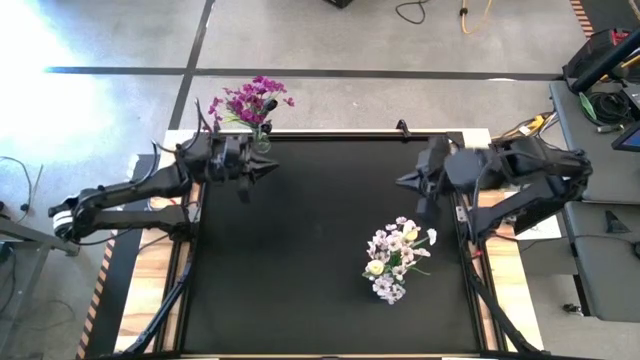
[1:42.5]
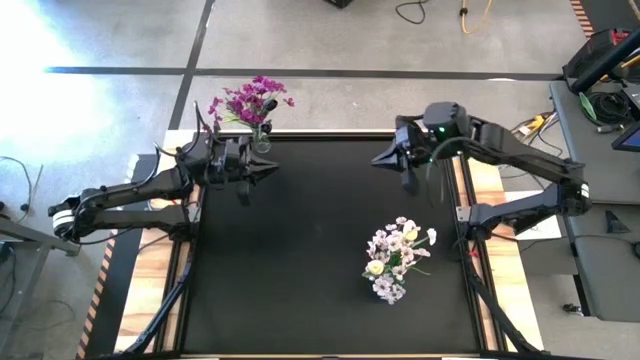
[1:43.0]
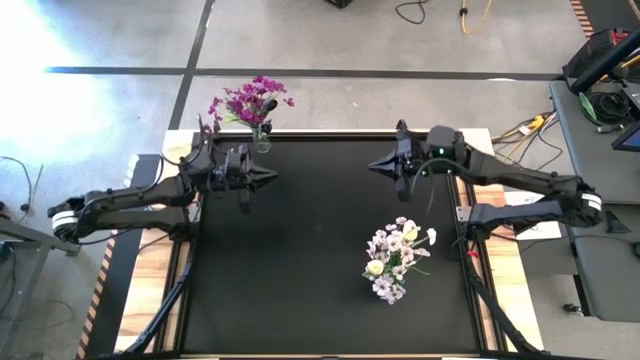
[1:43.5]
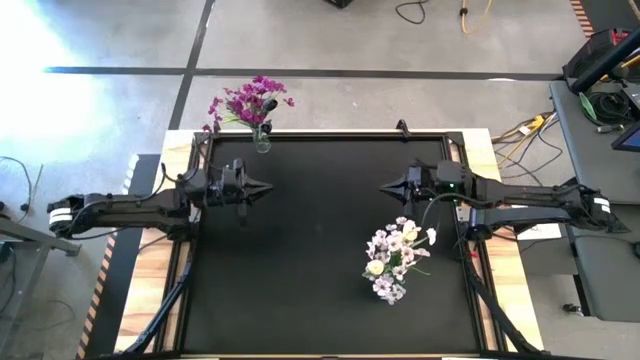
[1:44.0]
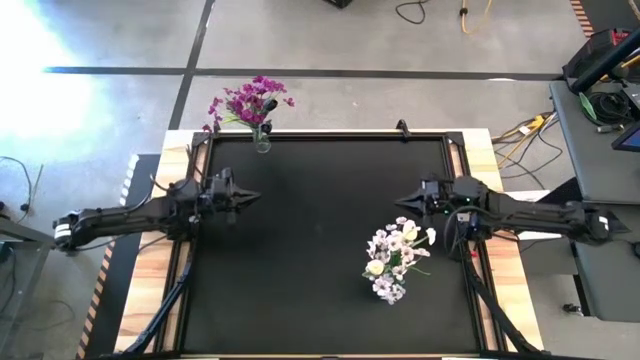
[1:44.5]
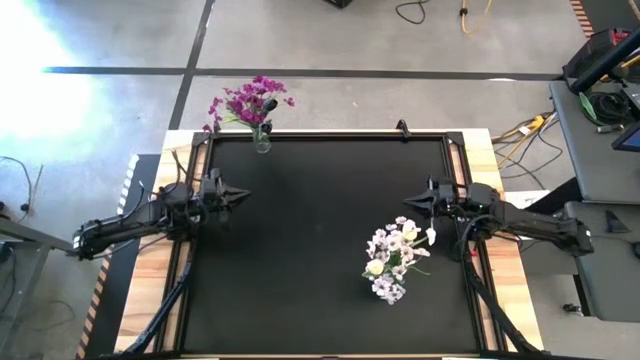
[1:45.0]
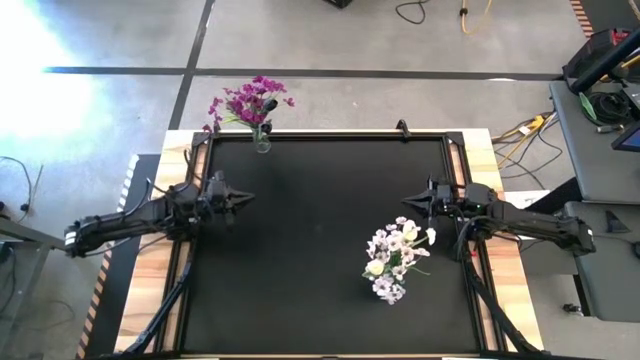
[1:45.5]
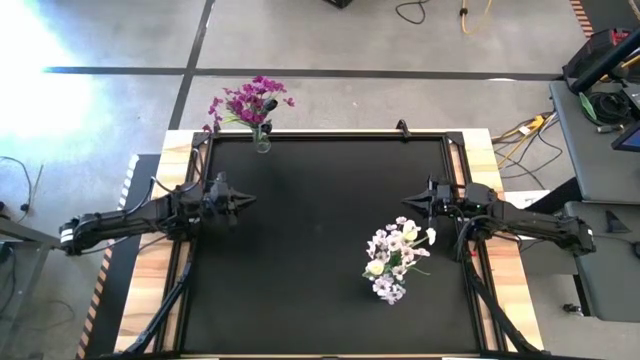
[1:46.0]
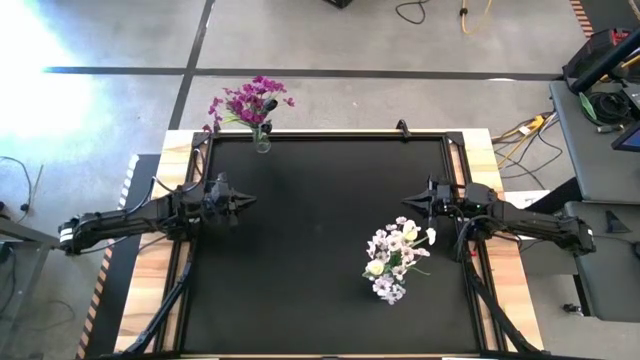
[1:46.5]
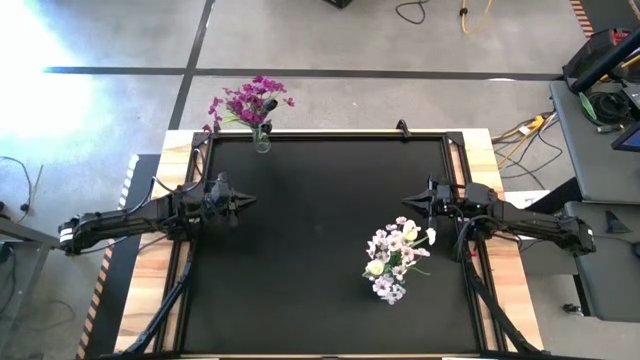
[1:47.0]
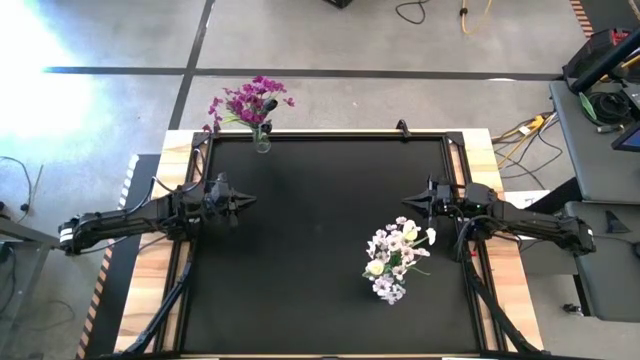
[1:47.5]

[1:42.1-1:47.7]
Task: Sort flowers into vase by color
Return to Home Position

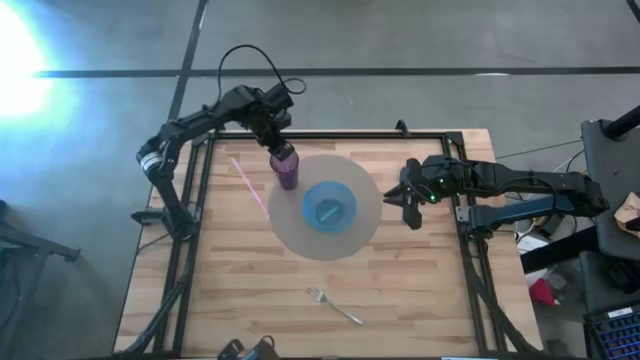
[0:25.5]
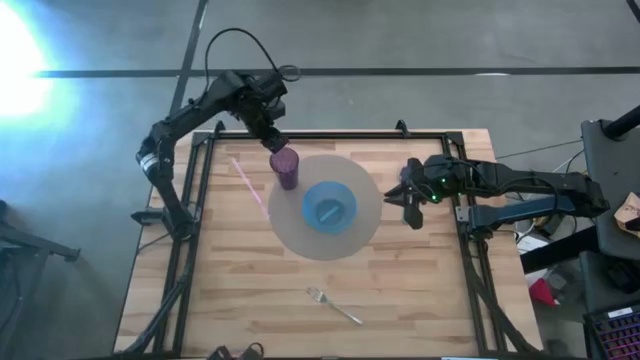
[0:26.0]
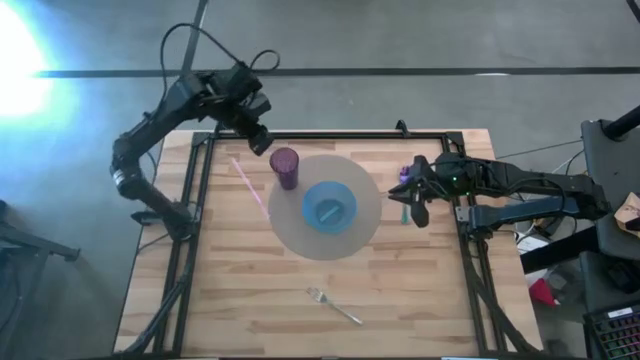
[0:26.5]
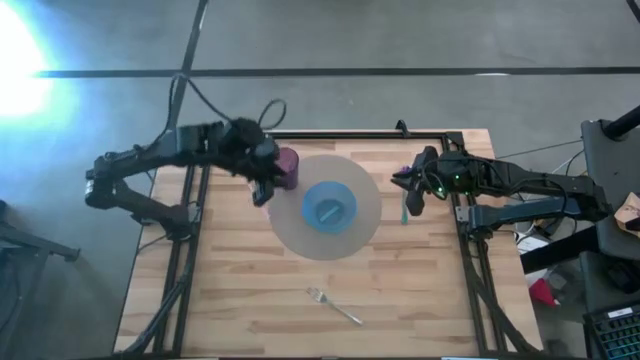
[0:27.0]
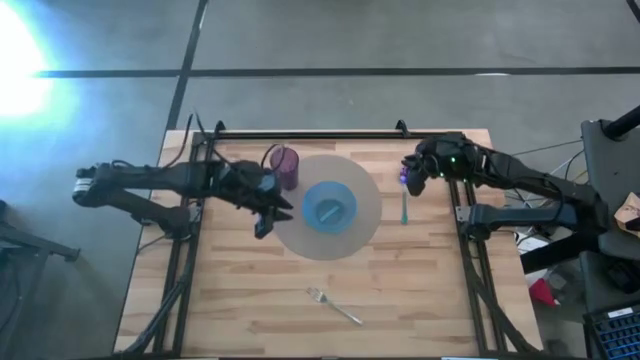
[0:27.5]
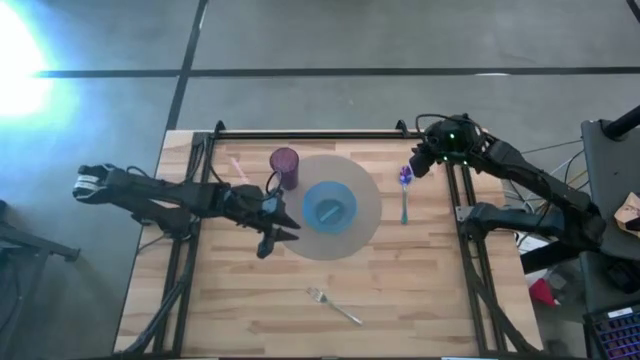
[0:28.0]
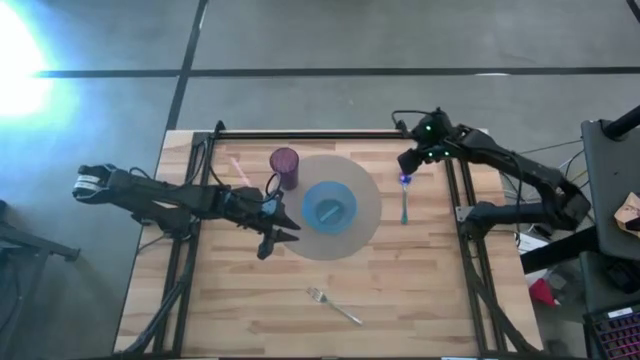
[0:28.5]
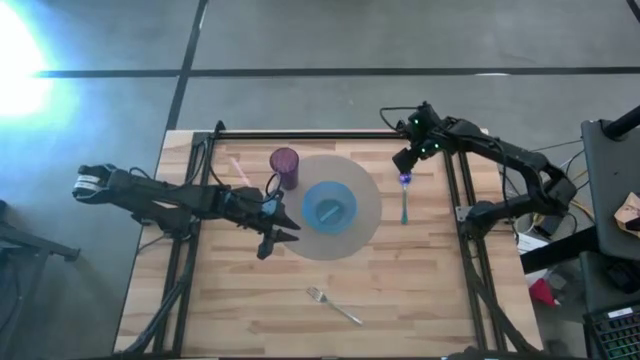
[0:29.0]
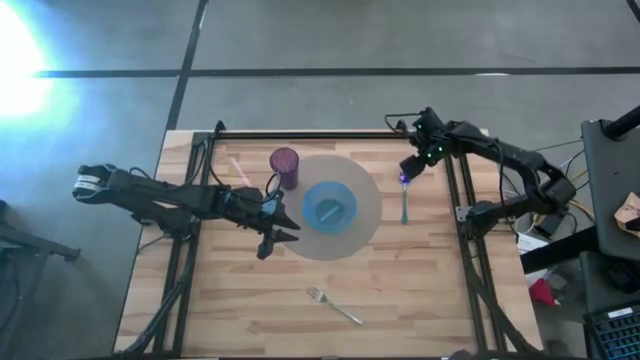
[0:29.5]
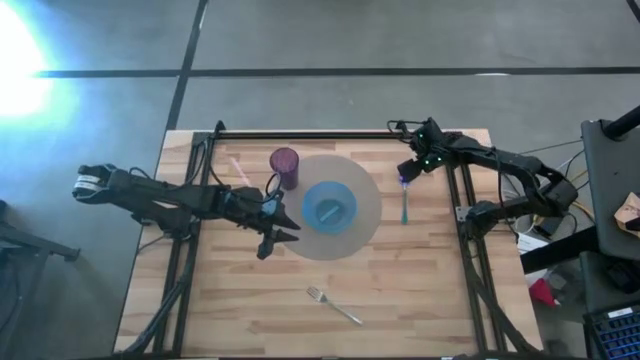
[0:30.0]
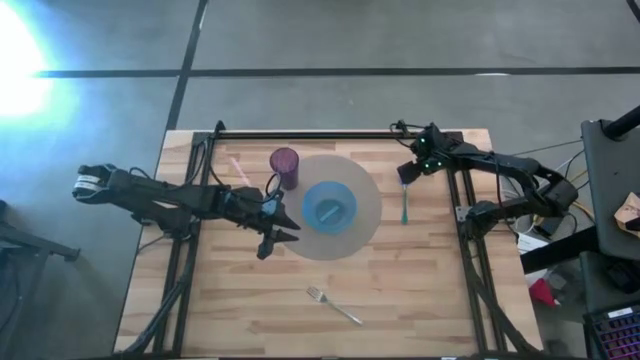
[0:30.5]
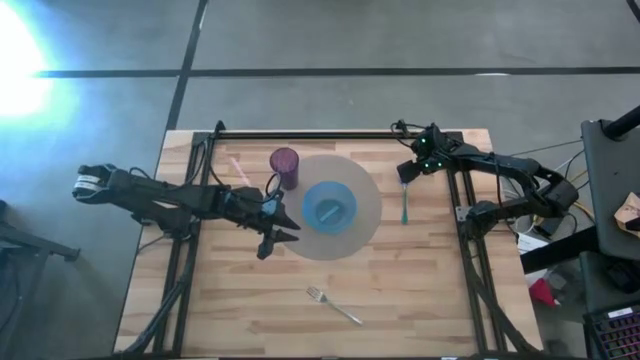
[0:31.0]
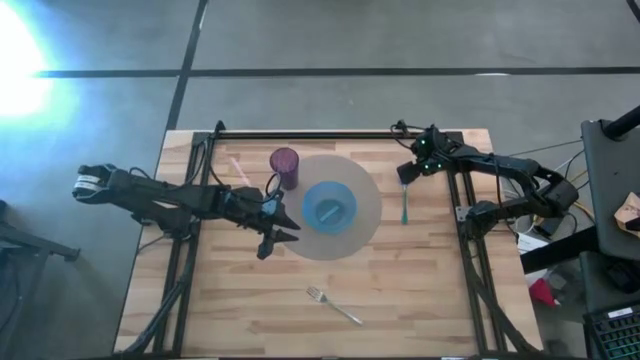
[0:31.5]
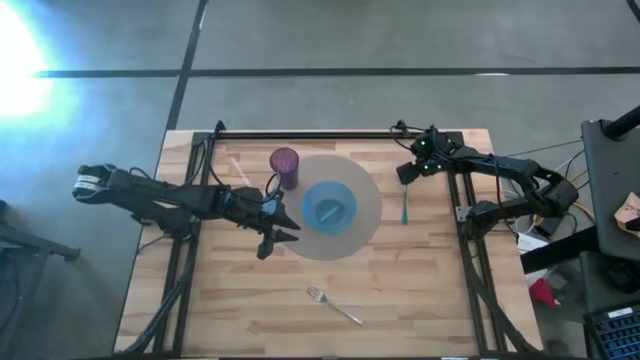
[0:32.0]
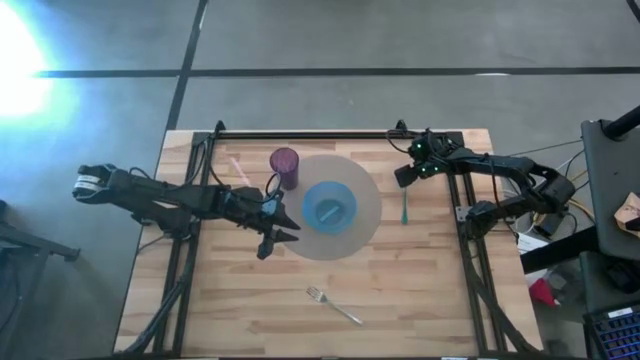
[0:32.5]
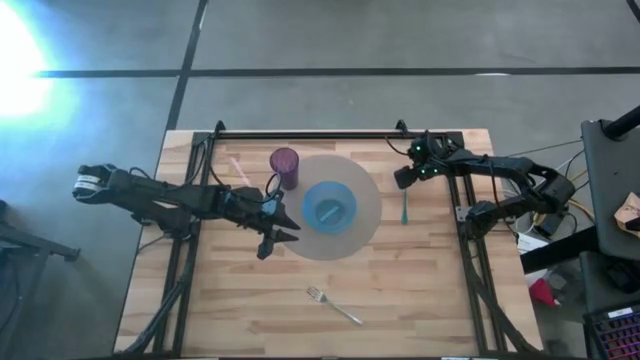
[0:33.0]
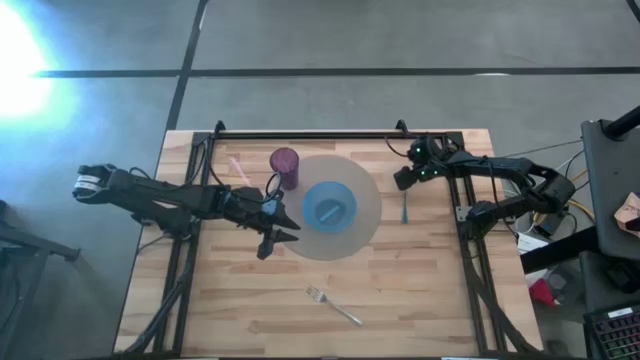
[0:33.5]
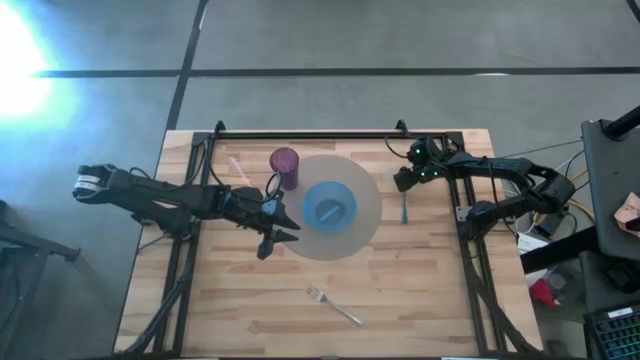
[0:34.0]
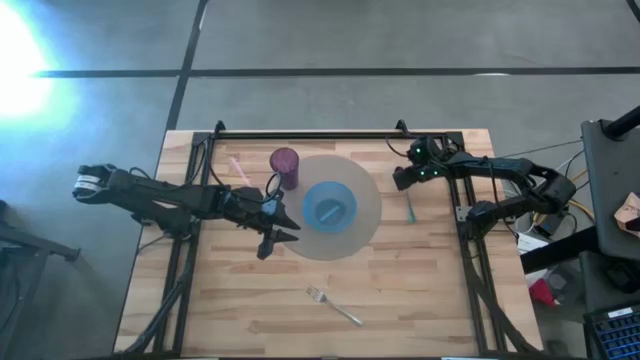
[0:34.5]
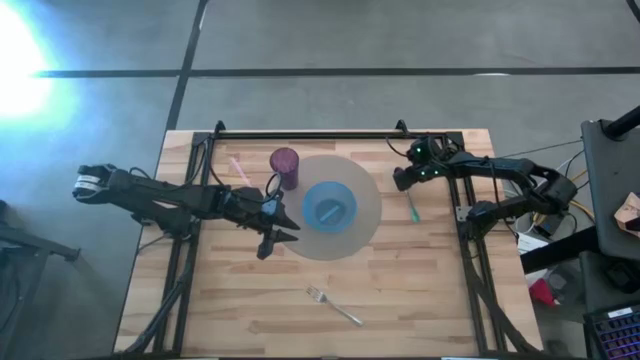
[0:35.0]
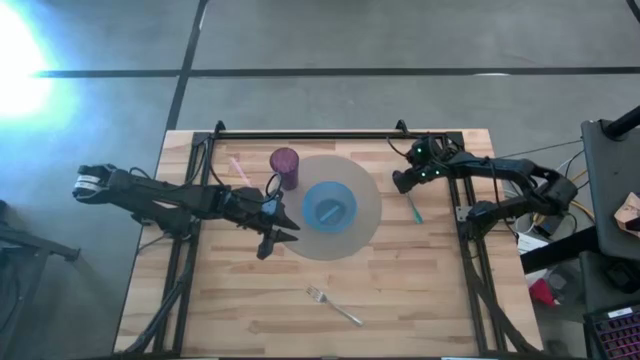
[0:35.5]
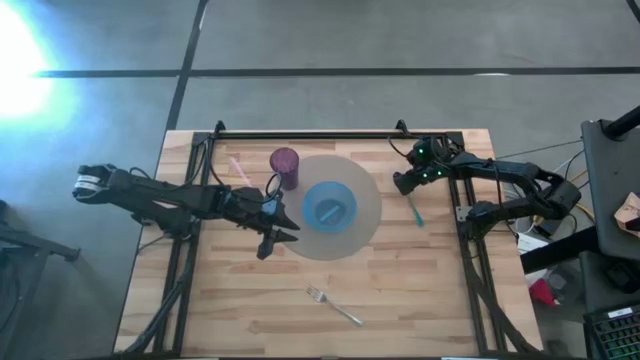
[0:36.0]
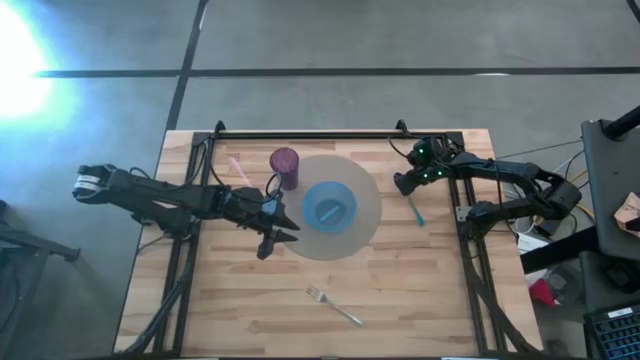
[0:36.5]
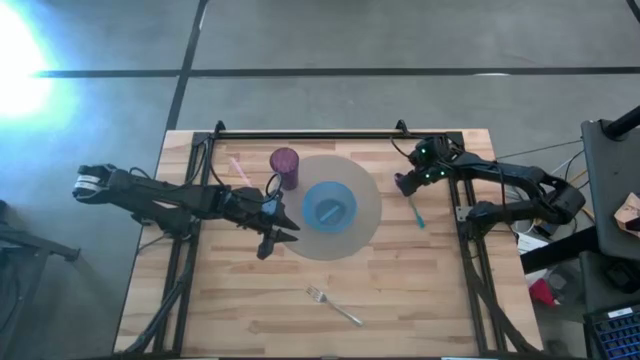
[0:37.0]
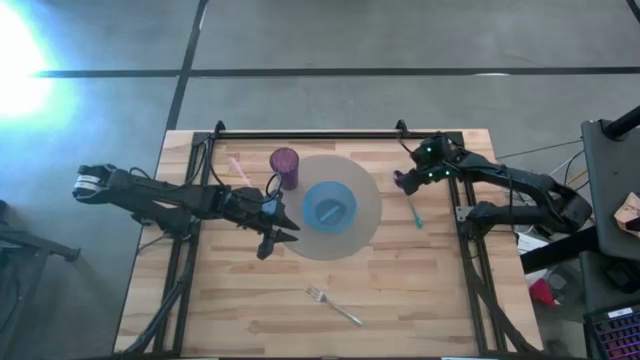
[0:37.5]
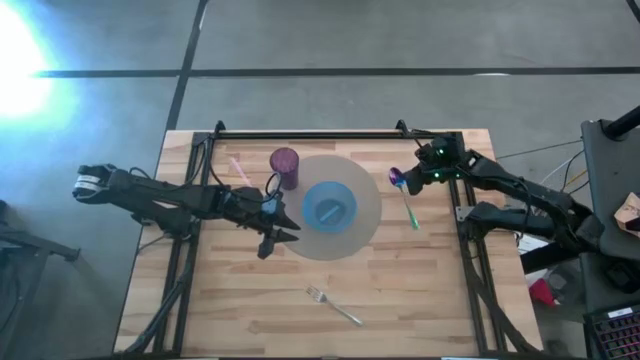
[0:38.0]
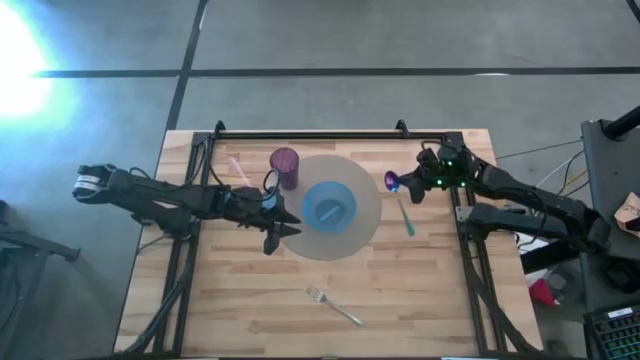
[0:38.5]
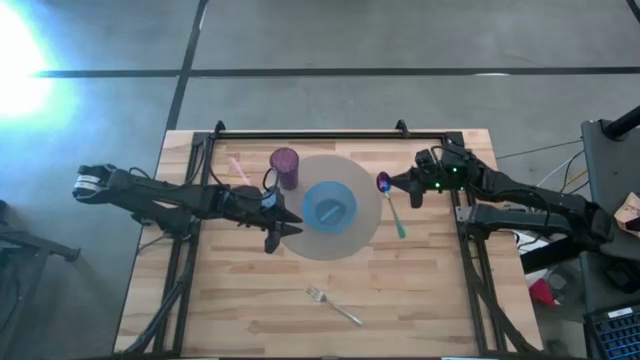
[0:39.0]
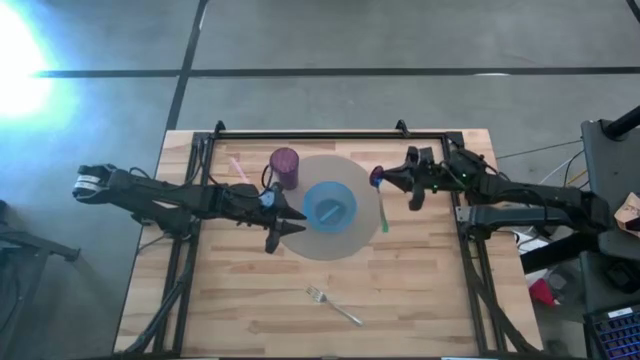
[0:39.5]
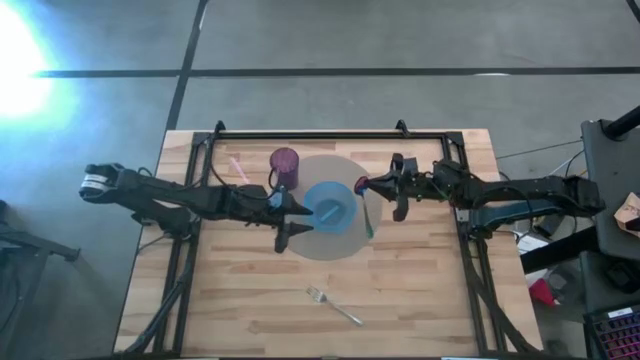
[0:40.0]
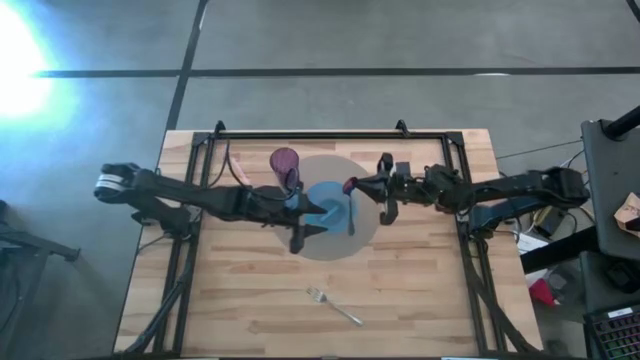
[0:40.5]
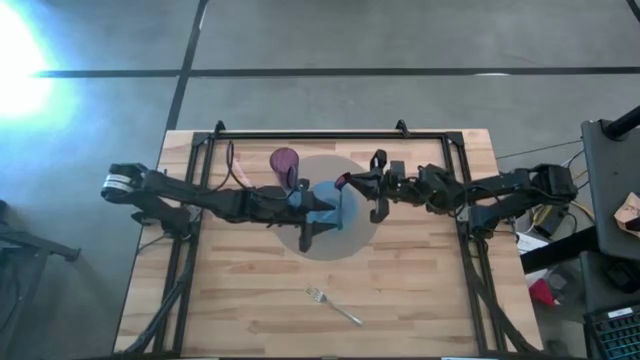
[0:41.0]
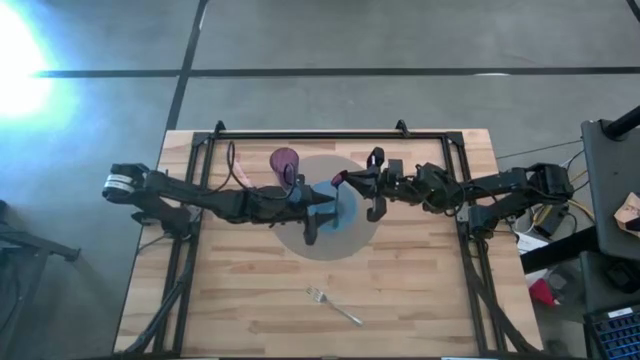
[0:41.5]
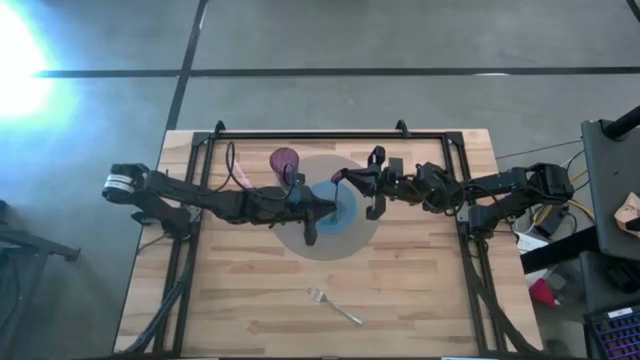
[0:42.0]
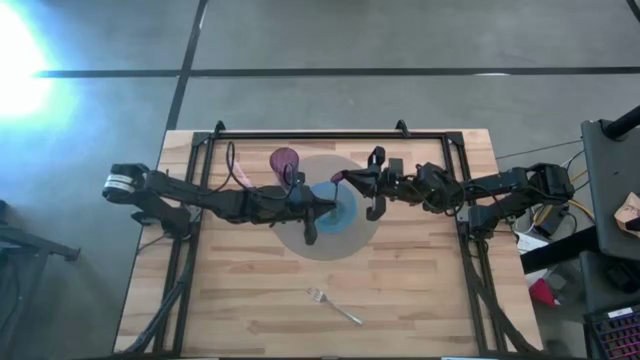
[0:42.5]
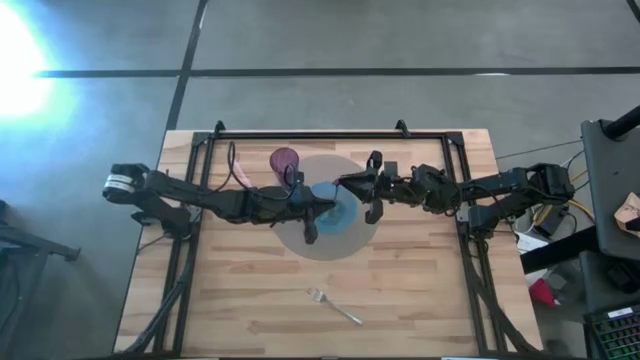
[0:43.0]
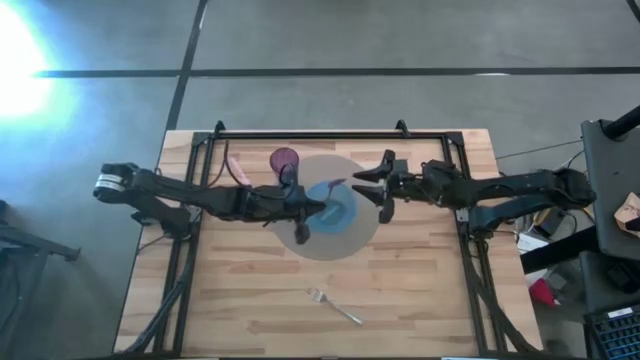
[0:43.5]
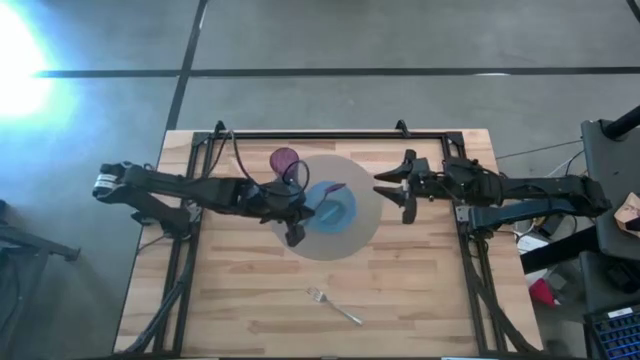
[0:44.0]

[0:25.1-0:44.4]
Task: Pick & Place Utensil
Put the violet spoon into the blue bowl on the gray mat
